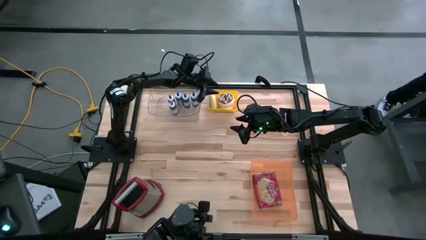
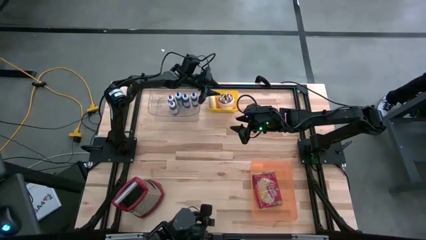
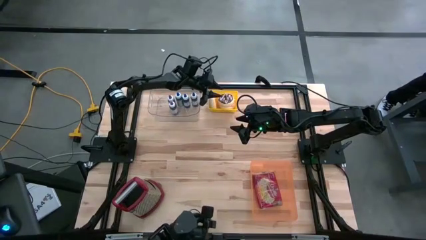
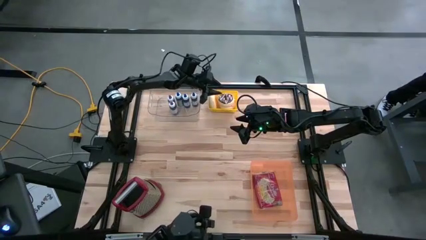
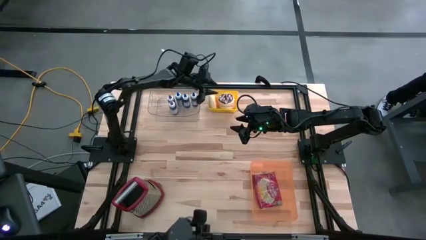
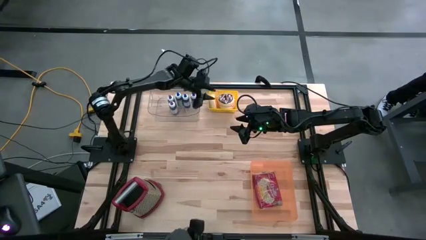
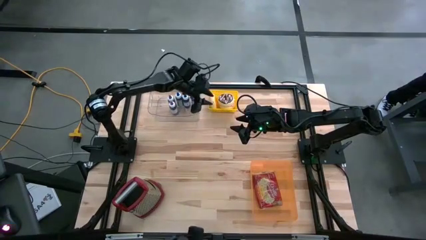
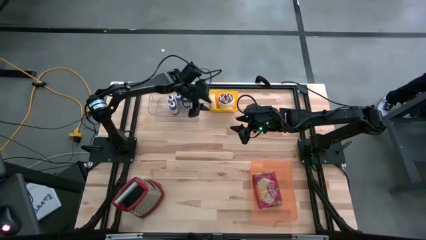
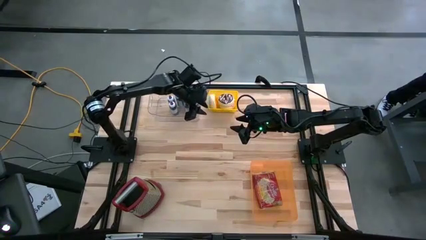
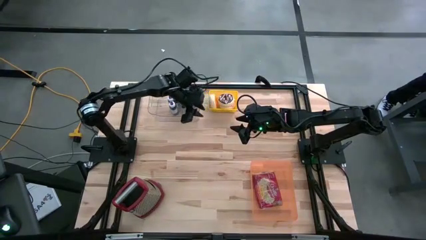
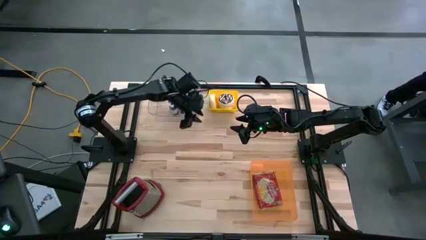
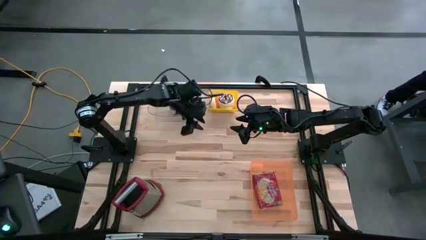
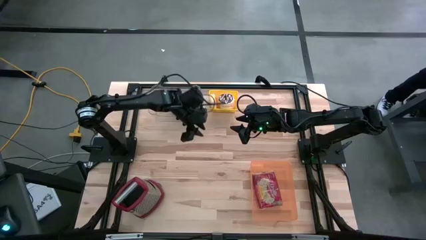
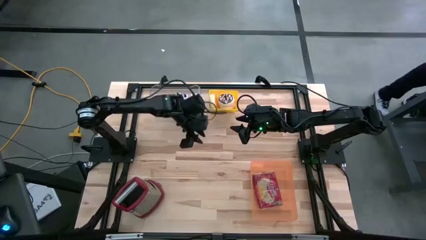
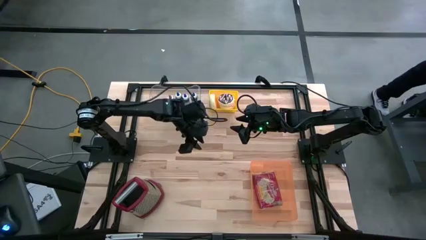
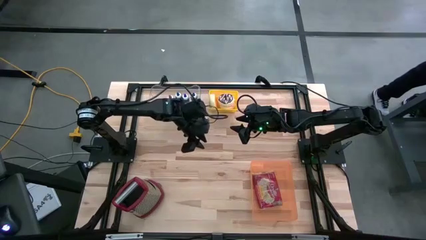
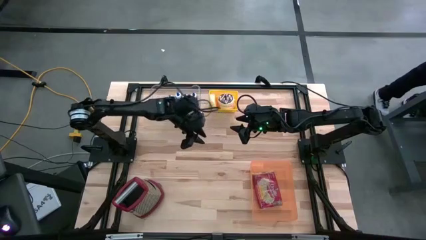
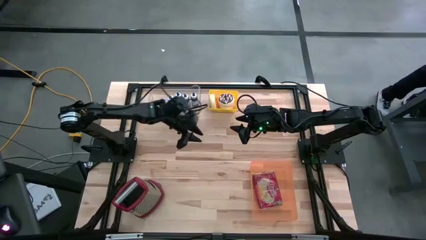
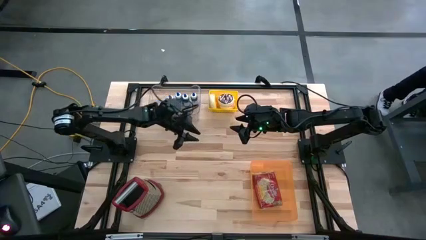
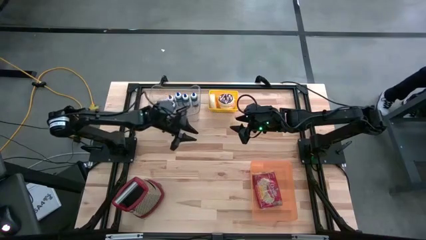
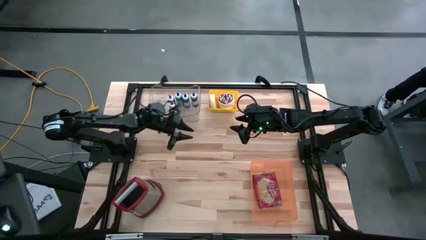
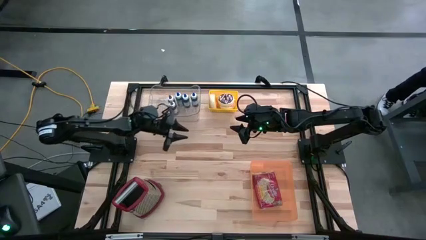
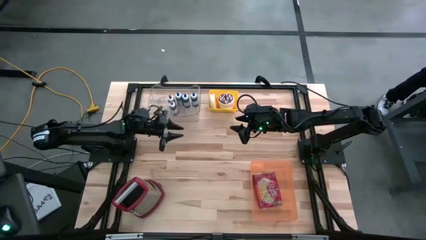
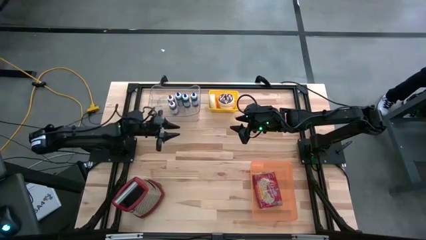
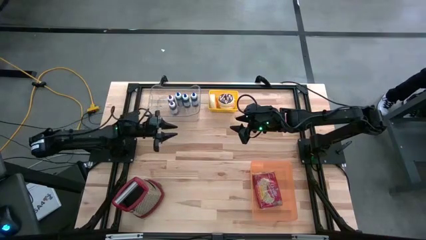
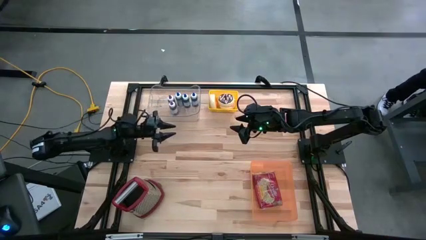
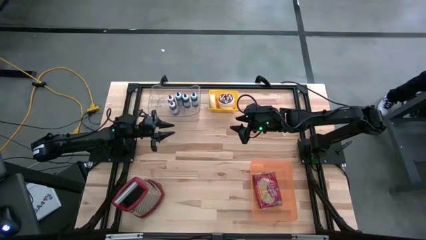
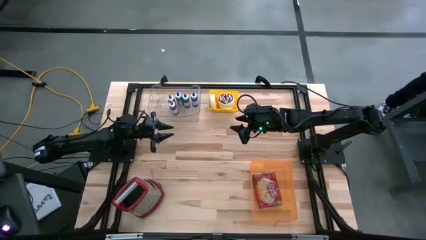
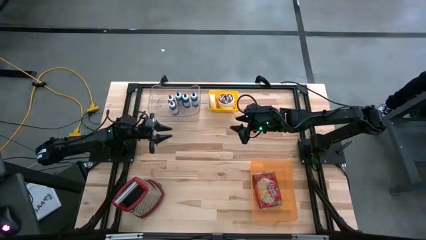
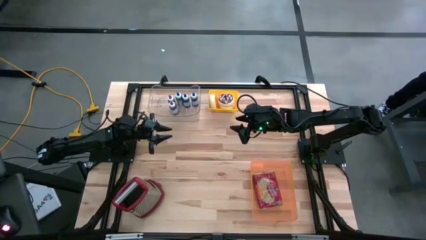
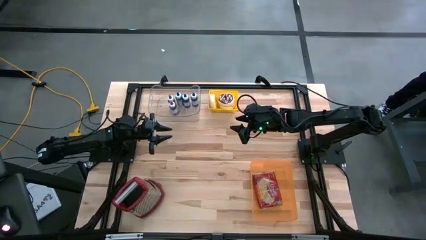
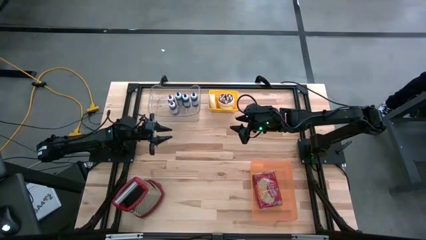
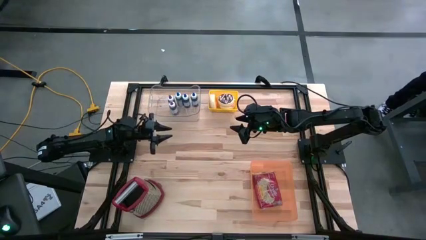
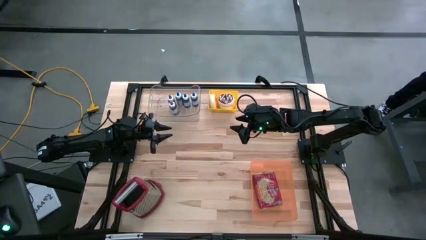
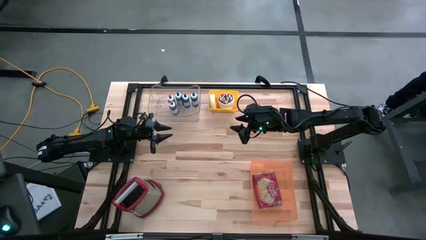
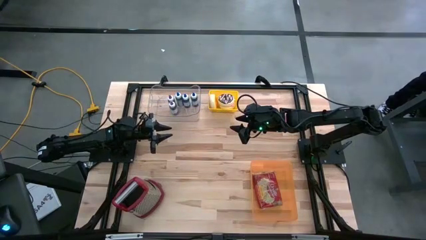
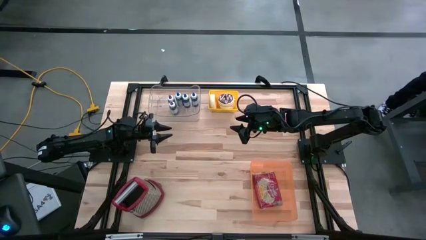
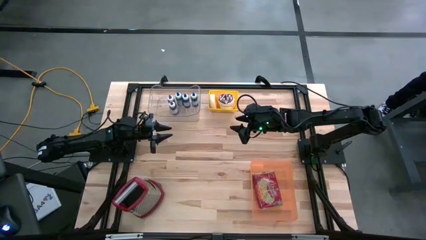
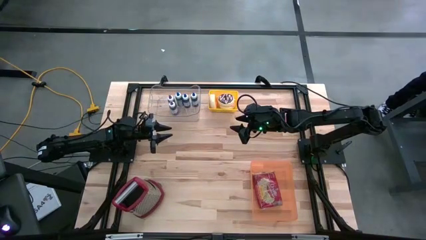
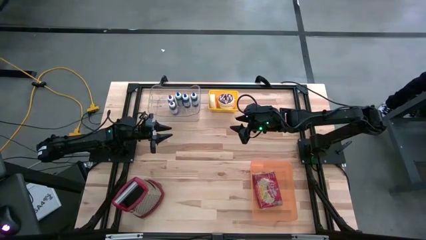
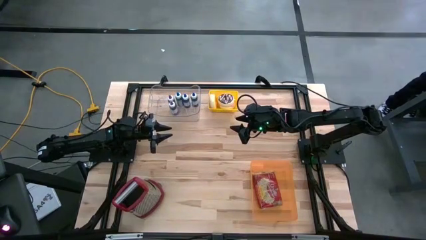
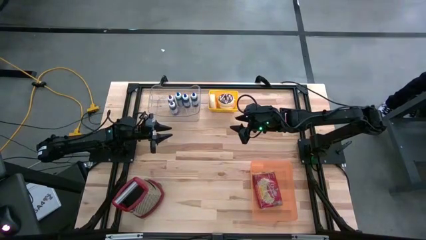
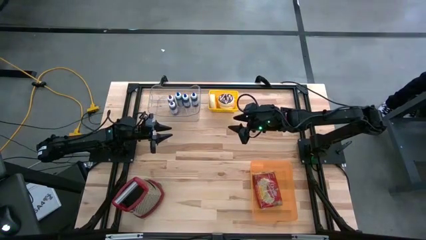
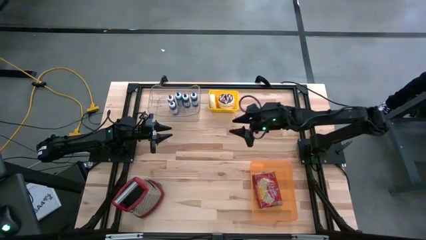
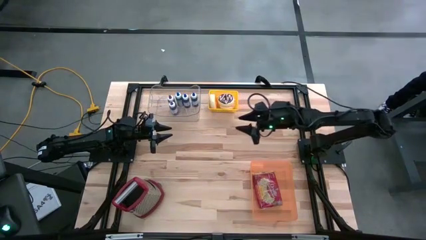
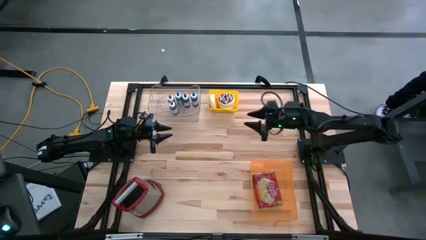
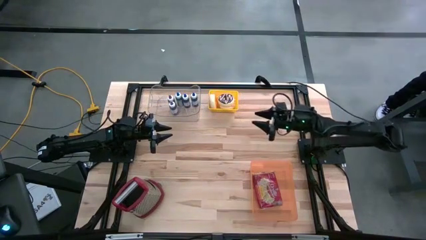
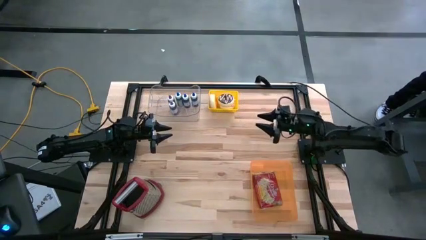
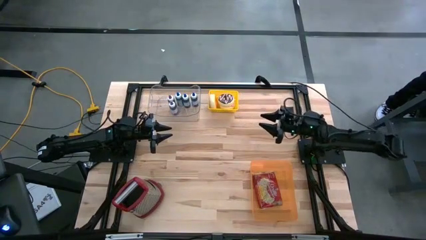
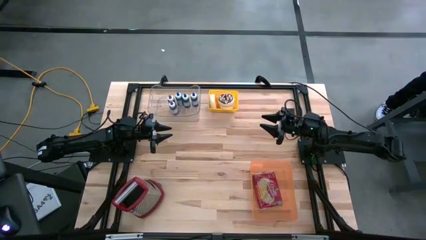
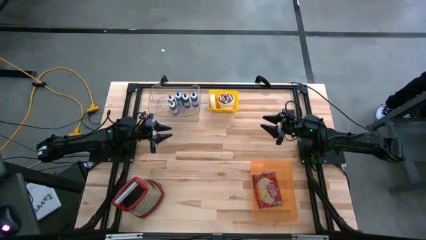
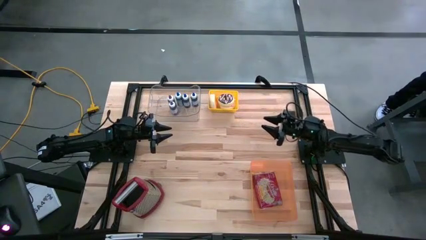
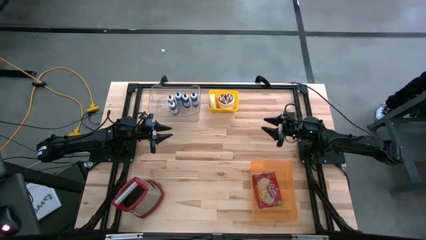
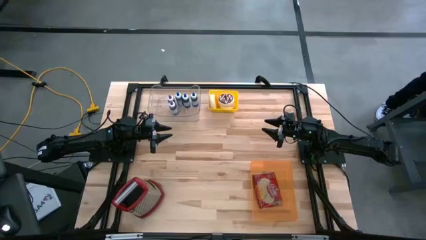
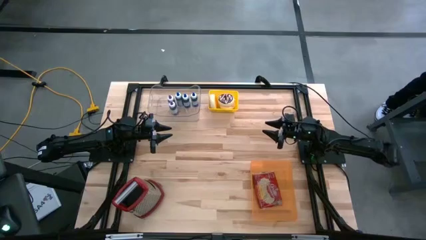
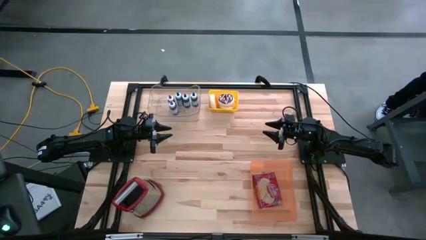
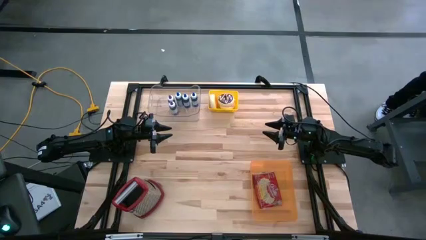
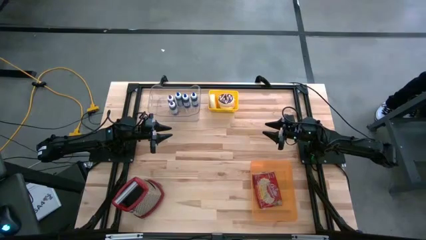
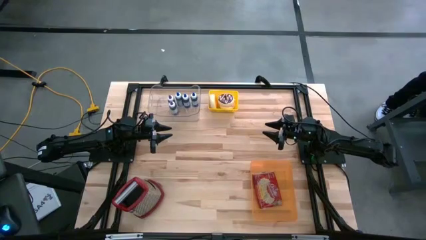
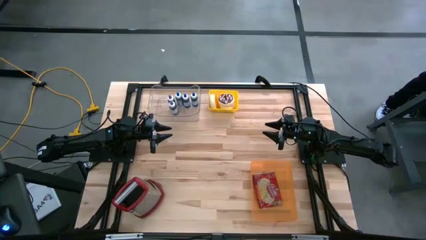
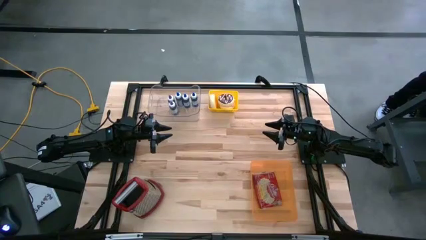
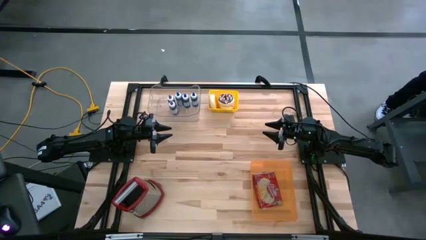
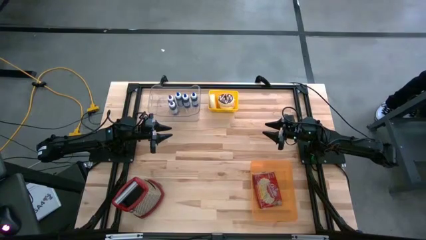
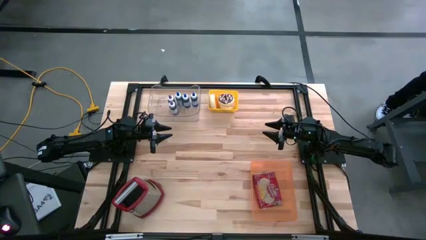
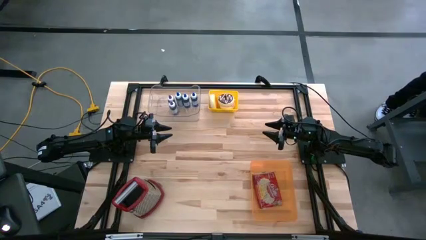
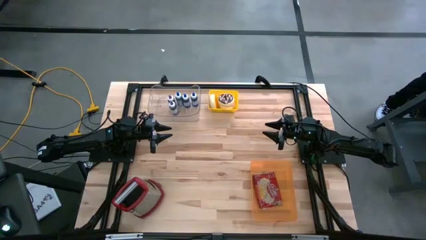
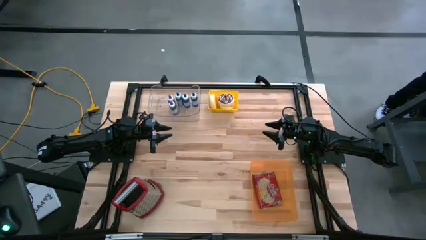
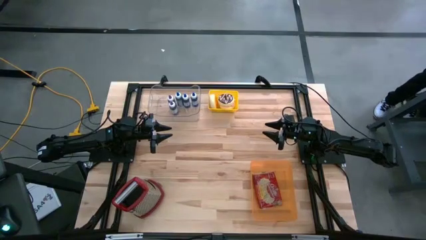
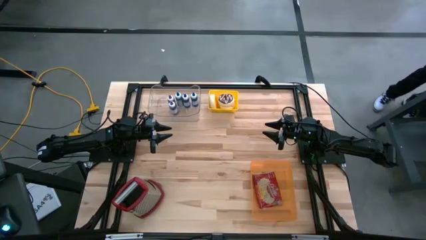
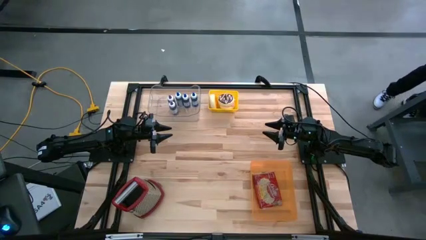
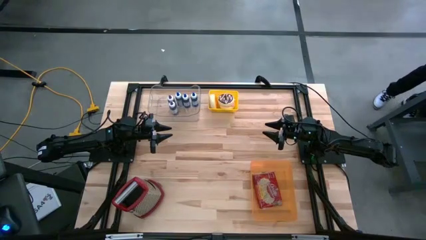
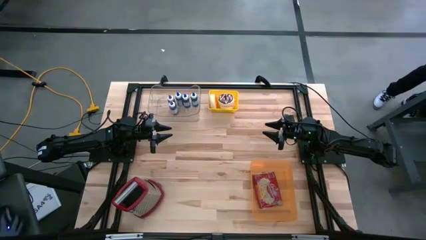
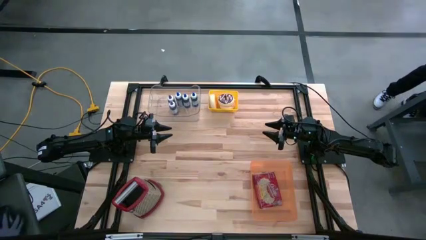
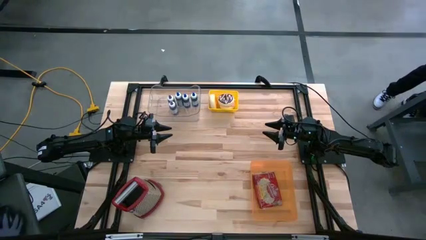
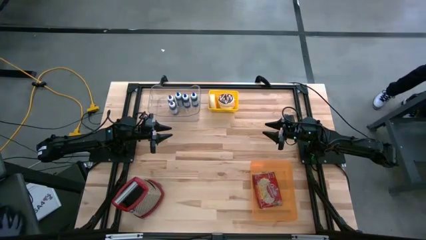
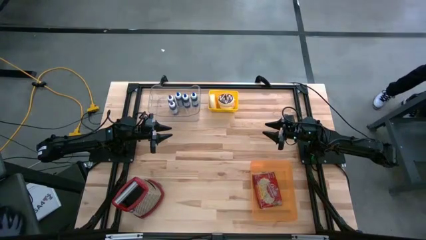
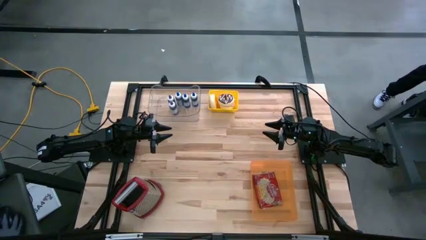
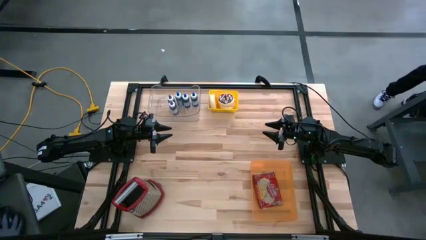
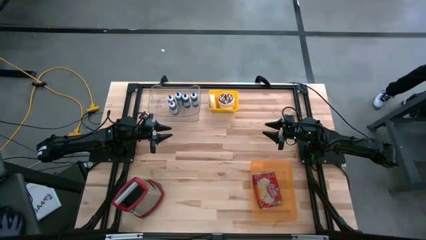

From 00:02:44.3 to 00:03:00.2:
Return to Home Position
